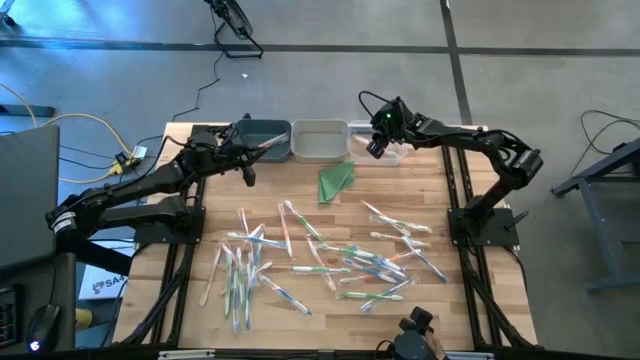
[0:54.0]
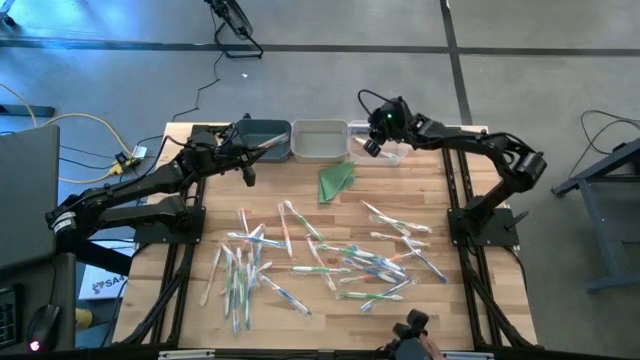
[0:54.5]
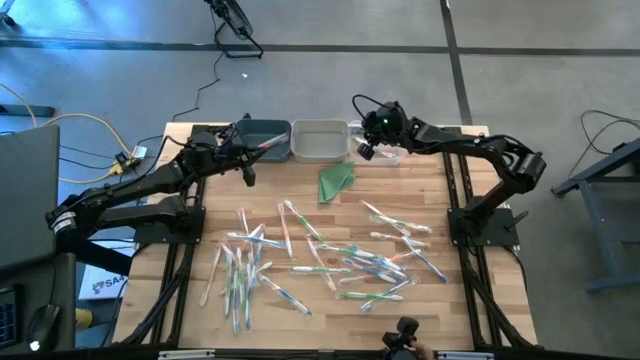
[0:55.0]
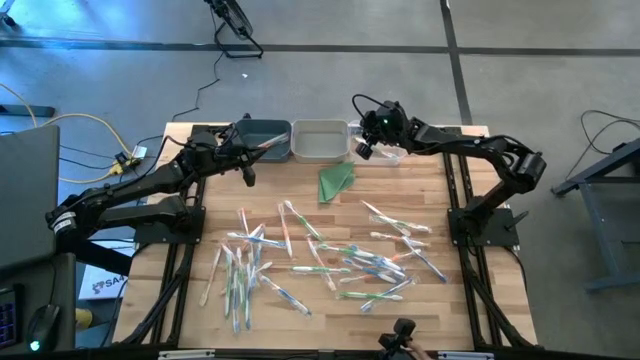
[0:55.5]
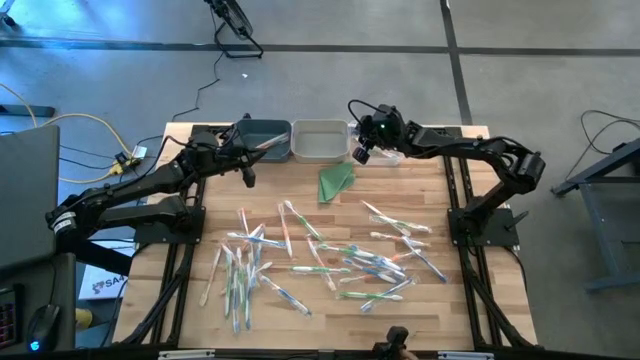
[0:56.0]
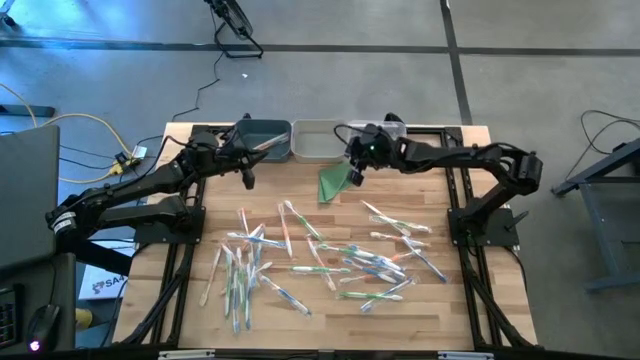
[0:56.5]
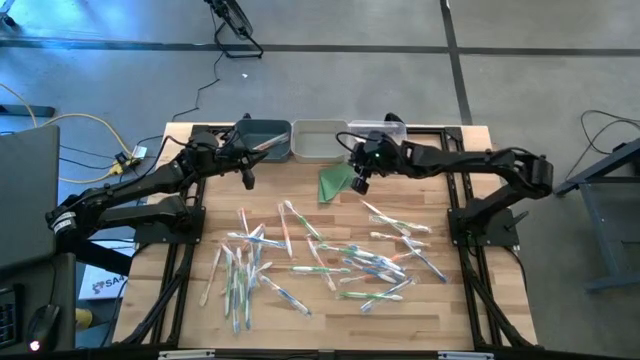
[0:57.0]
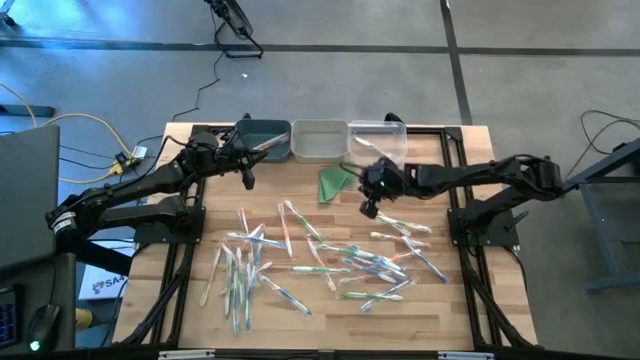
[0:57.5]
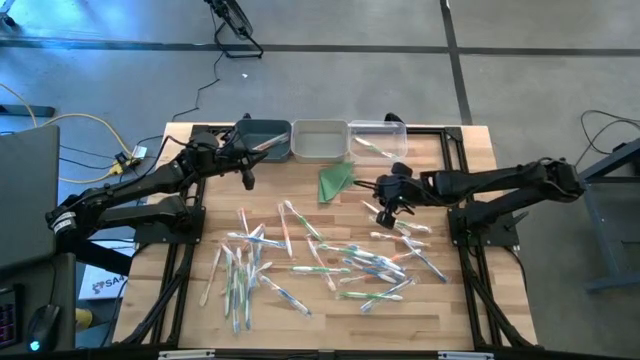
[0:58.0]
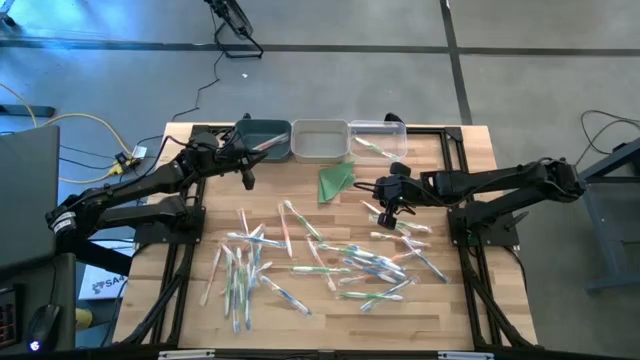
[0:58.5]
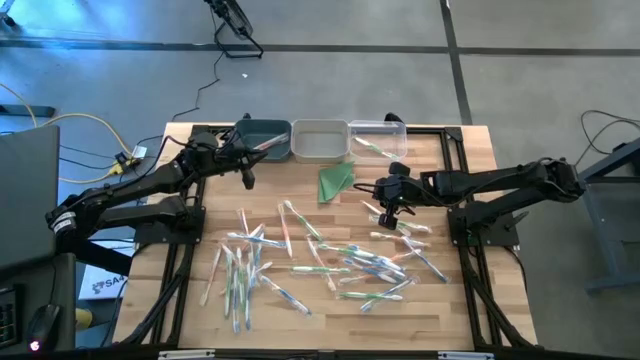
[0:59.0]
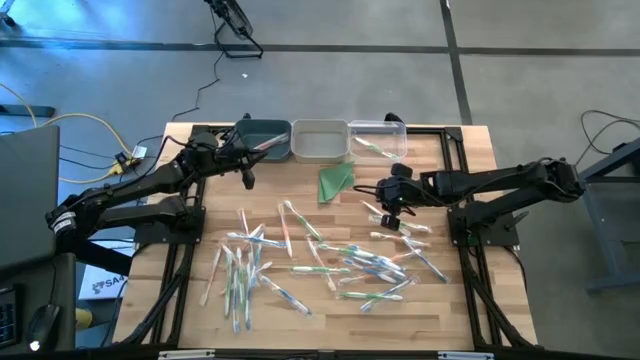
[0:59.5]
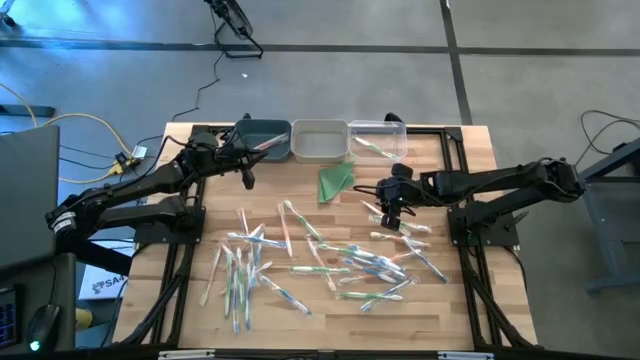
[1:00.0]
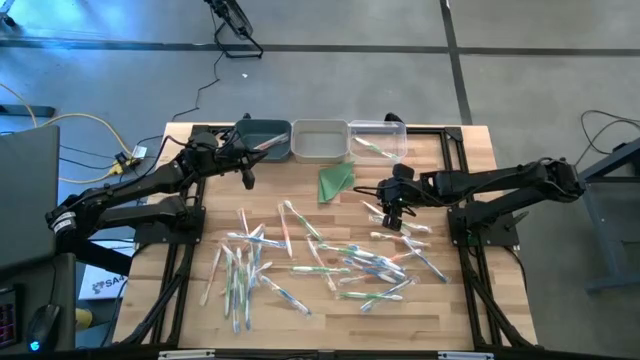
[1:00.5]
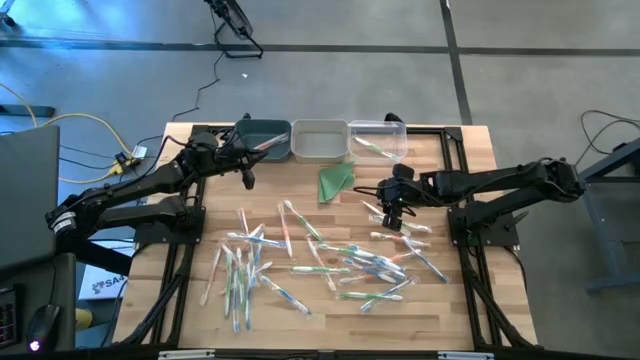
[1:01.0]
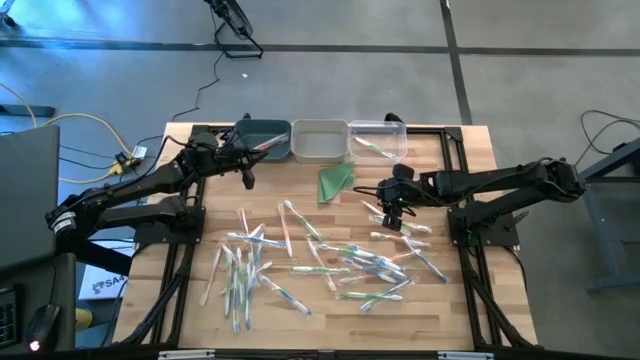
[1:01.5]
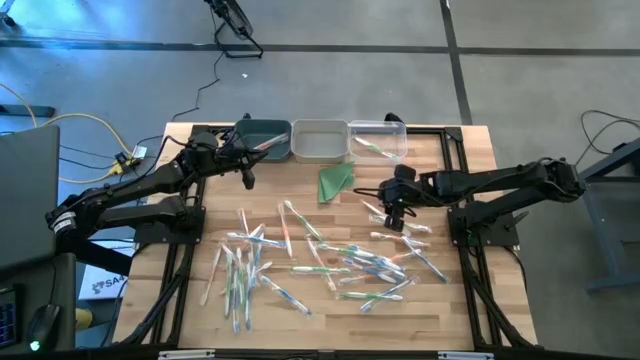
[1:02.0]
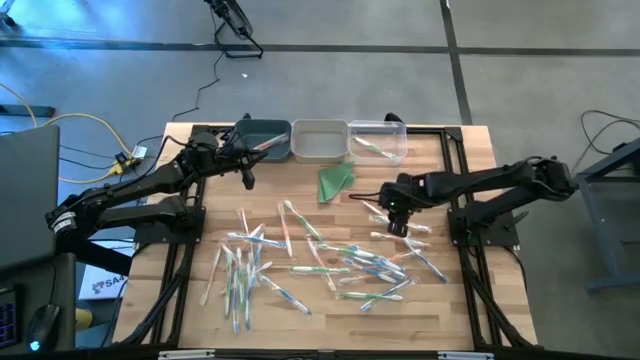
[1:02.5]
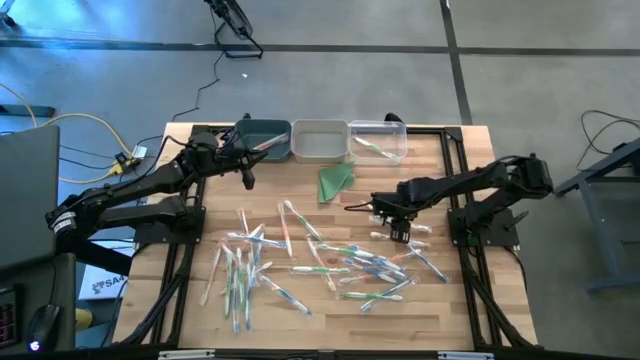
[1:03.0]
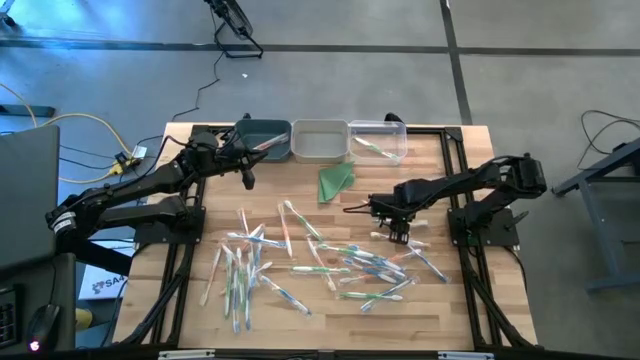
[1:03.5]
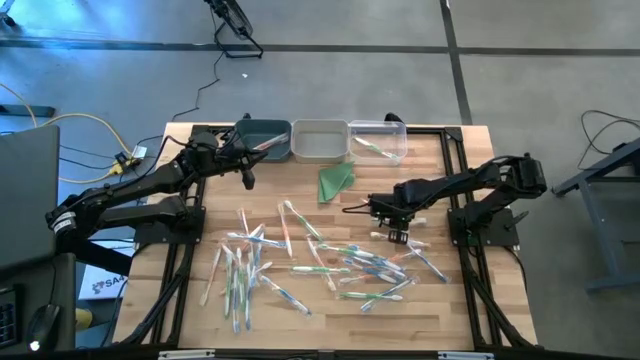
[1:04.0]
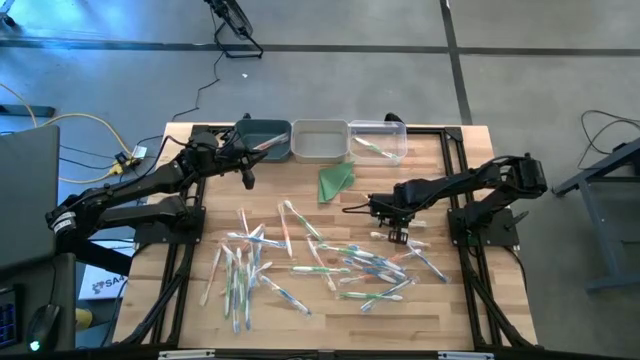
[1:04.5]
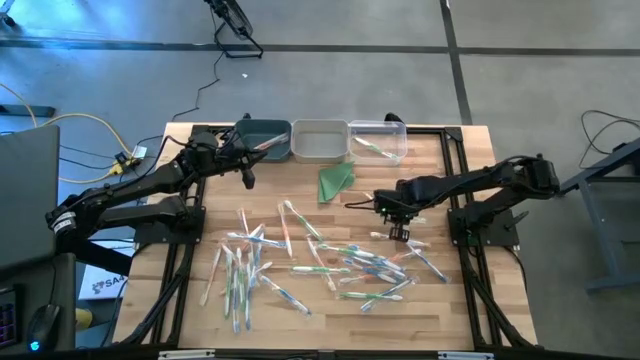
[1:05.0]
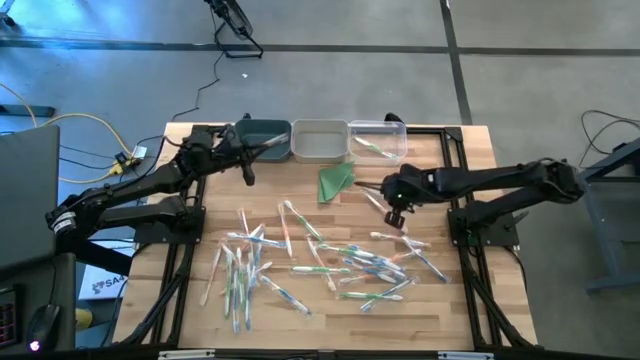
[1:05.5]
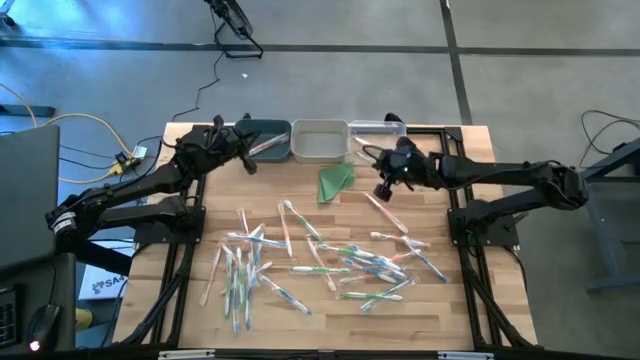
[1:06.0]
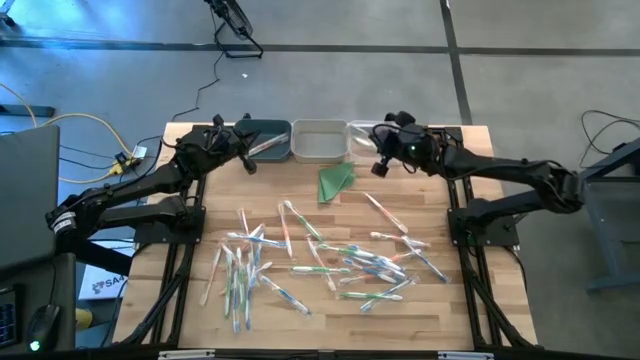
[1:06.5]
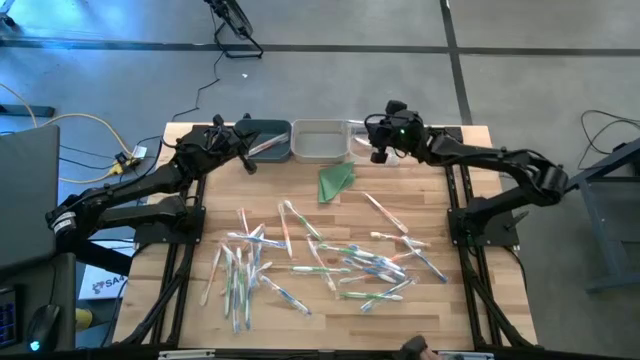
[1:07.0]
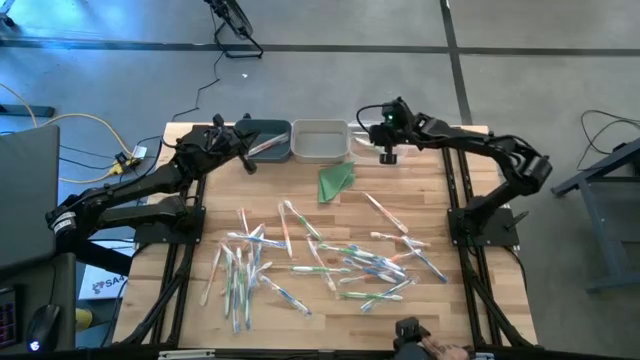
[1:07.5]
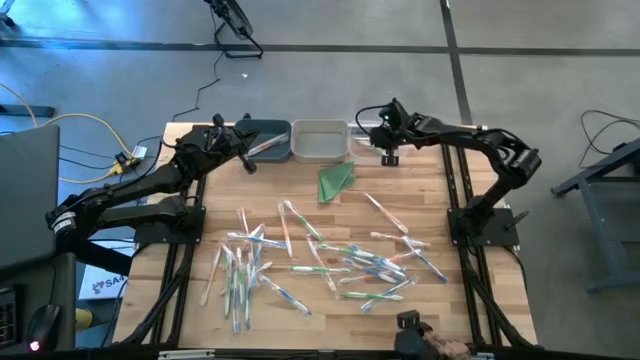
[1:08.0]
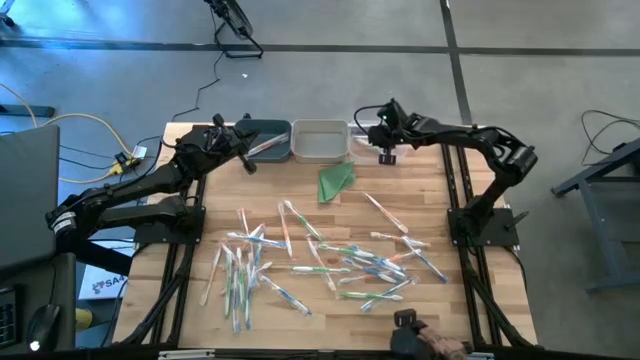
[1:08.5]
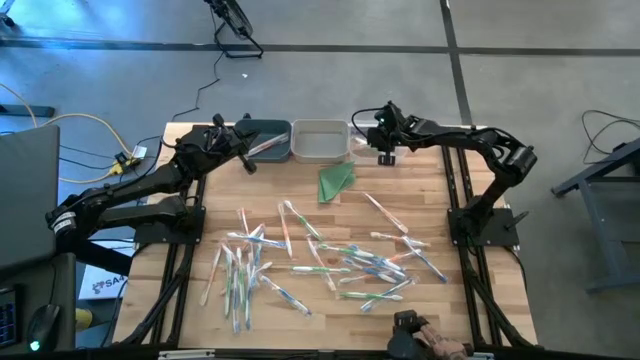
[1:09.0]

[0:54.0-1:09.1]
Task: Pick & Place Toothbrushes
Put the green toothbrush into the transparent bin

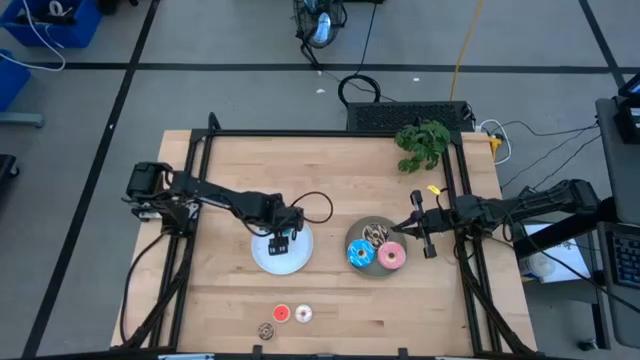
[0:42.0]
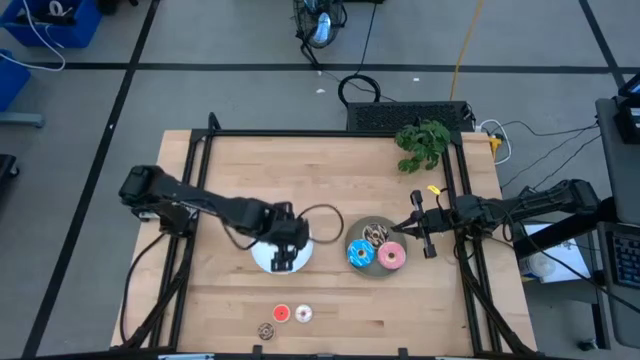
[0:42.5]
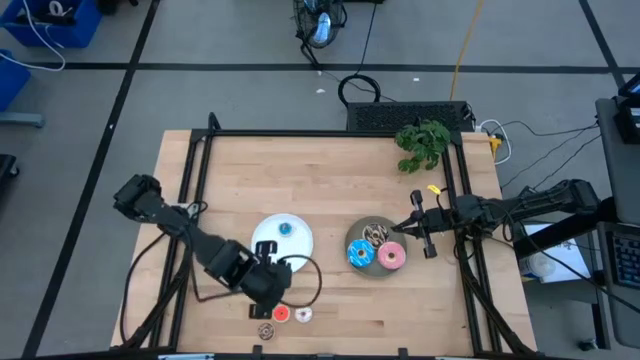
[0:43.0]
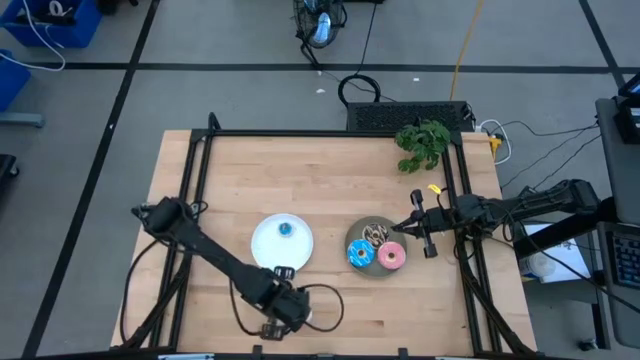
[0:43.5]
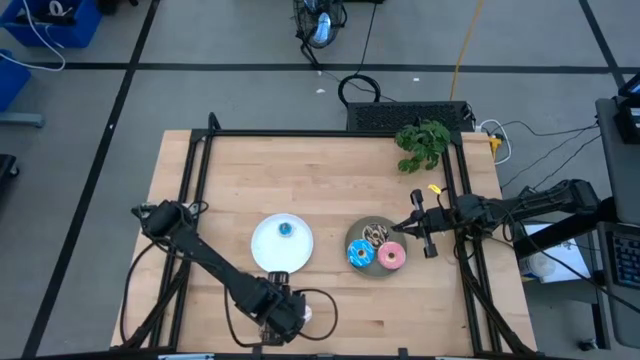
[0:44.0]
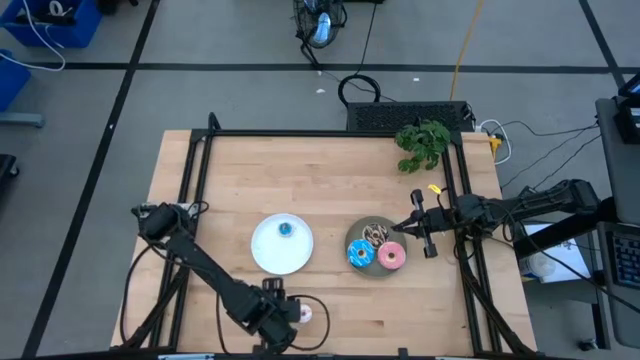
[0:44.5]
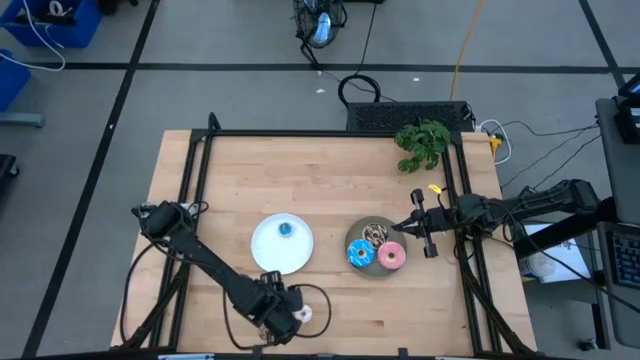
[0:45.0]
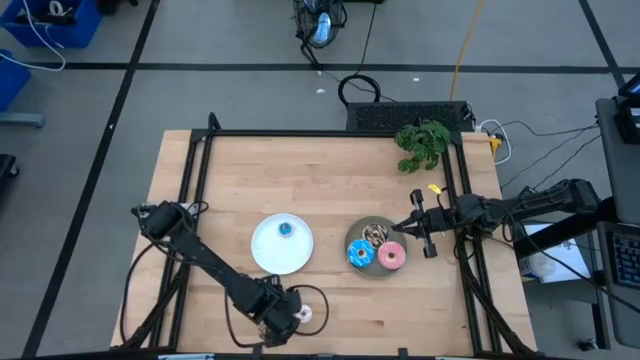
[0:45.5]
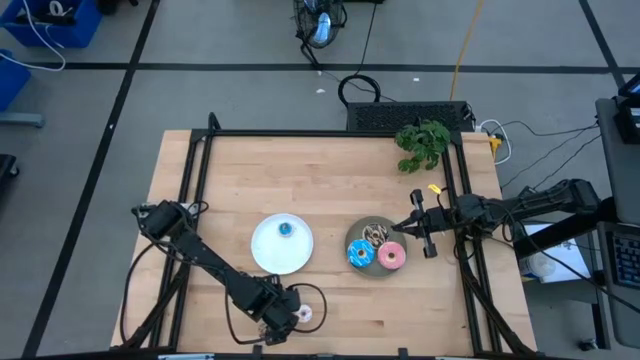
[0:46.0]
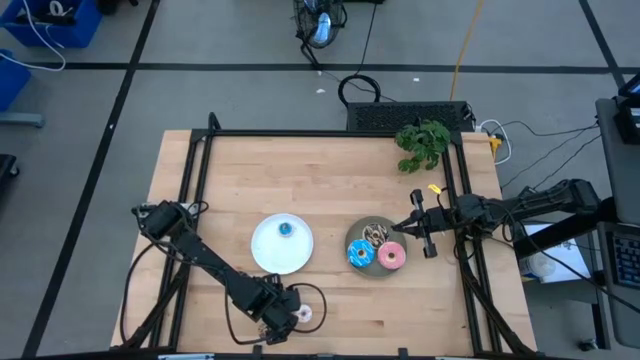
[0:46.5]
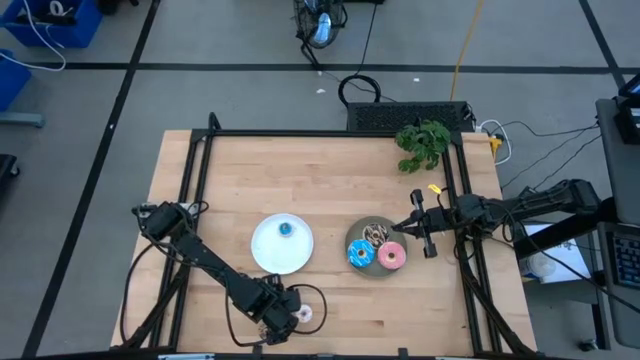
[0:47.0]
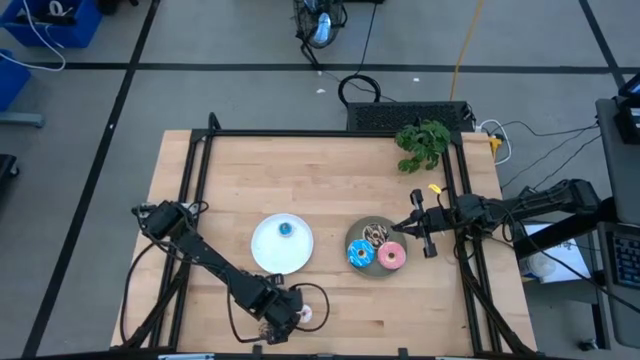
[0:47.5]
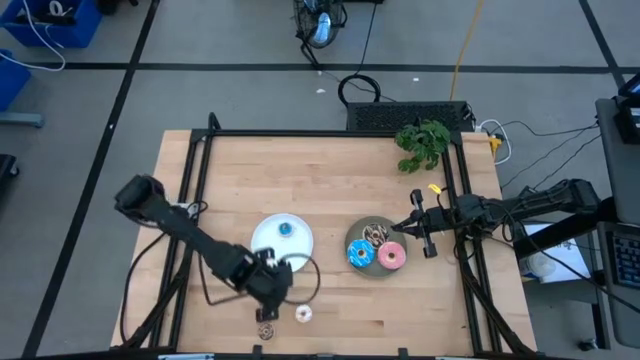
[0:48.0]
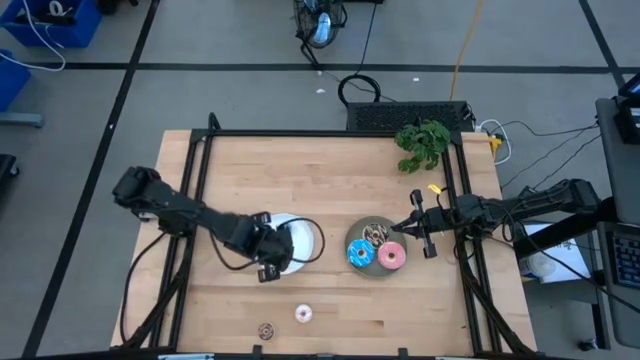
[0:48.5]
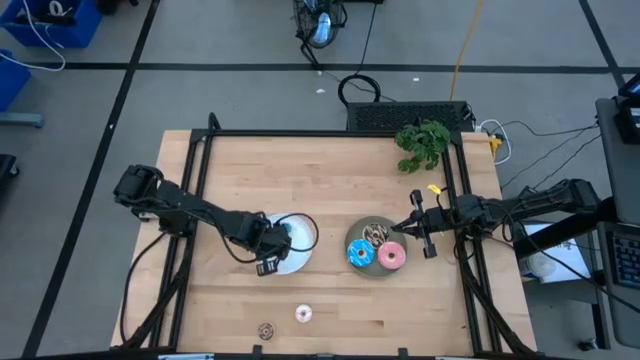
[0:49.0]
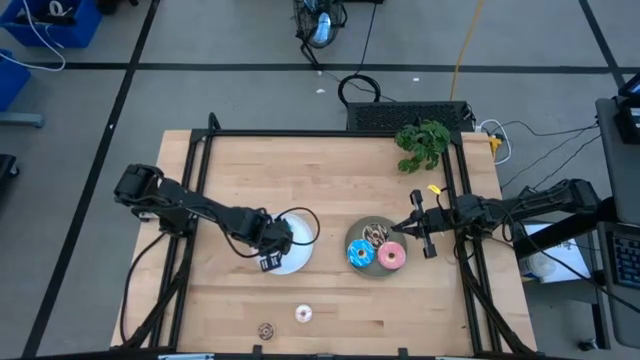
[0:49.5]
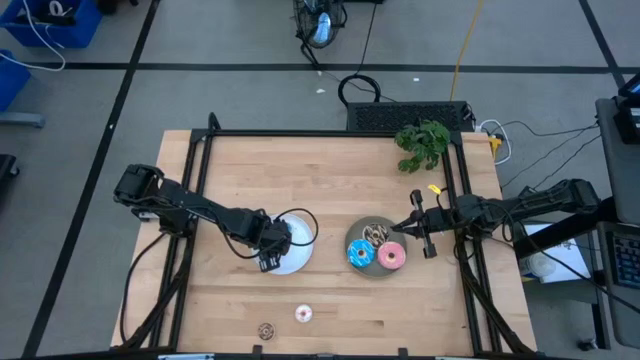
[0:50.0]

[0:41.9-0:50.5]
Task: Pick & Place donuts
Put the small orange donut on the white plate
